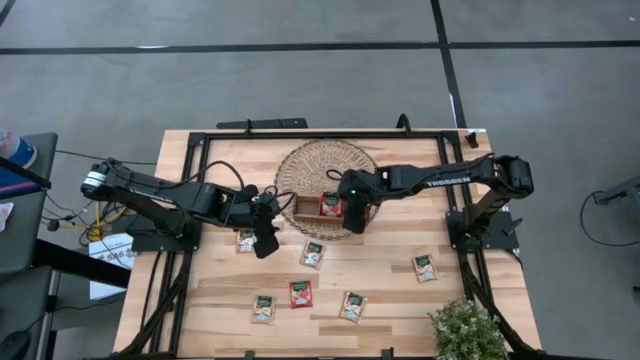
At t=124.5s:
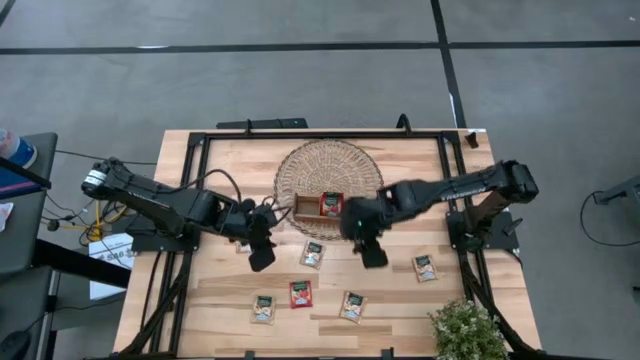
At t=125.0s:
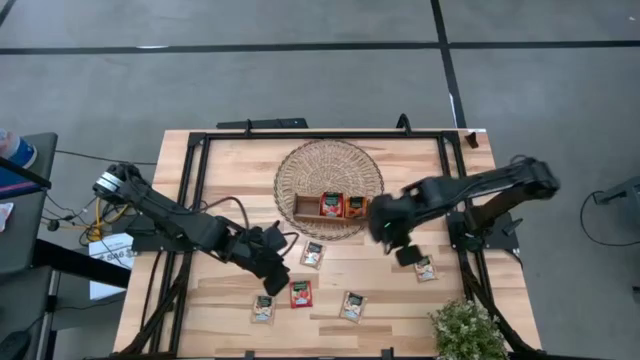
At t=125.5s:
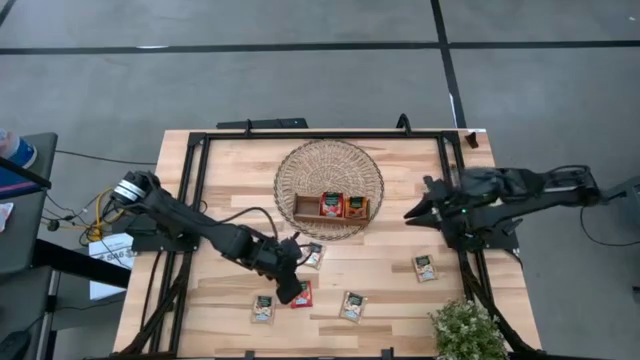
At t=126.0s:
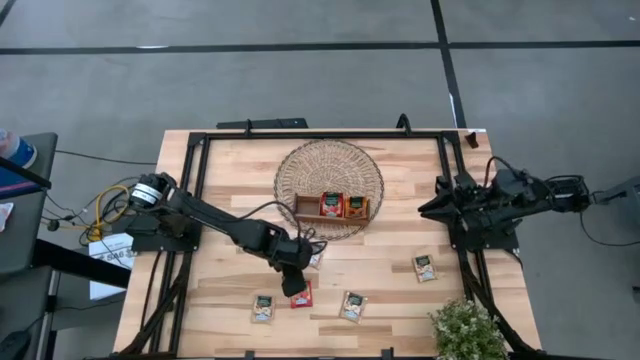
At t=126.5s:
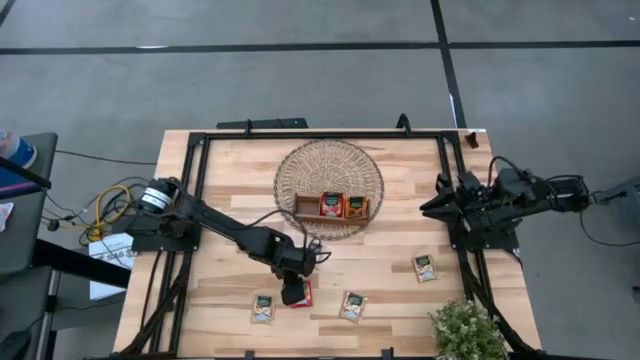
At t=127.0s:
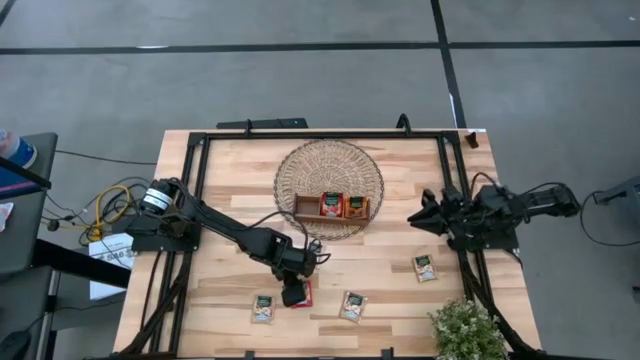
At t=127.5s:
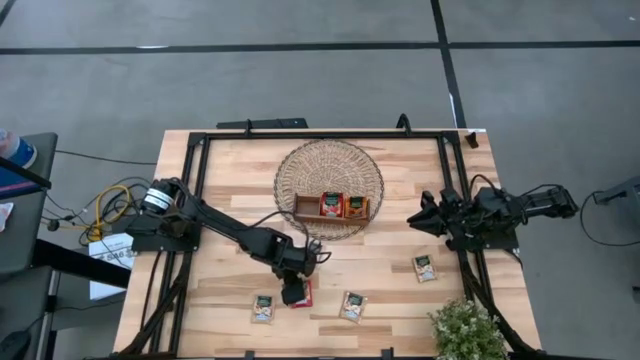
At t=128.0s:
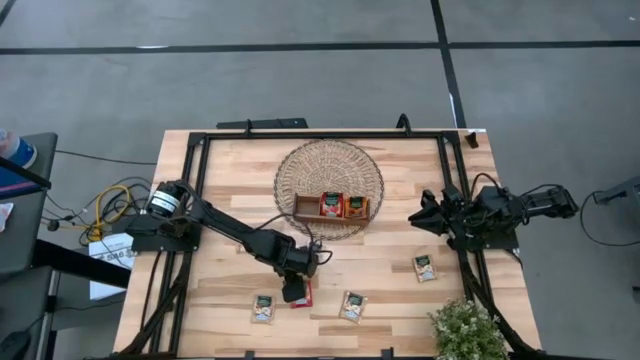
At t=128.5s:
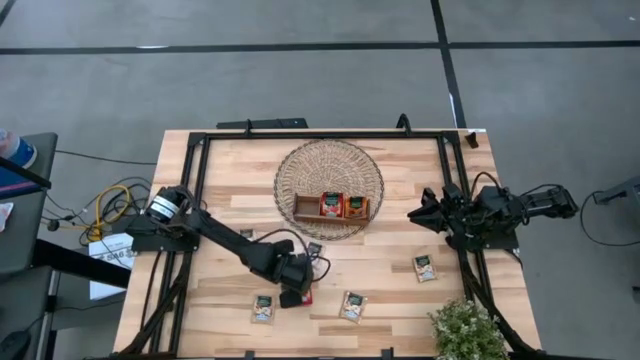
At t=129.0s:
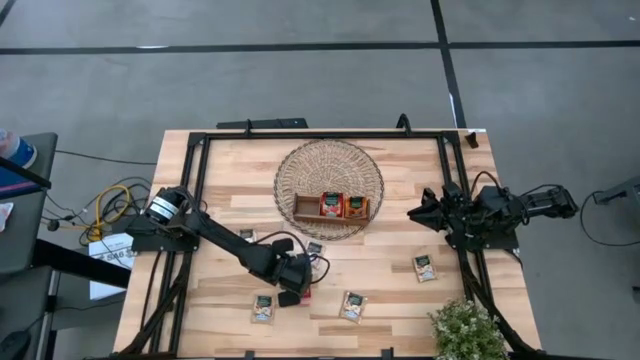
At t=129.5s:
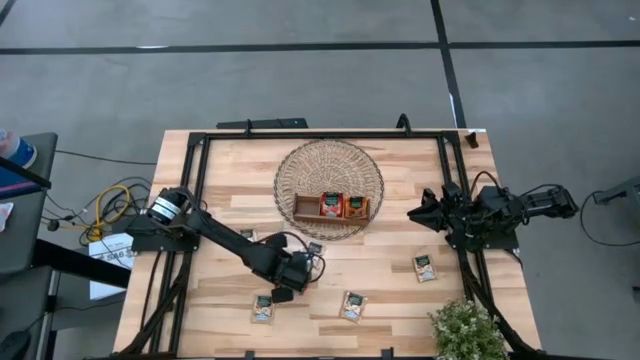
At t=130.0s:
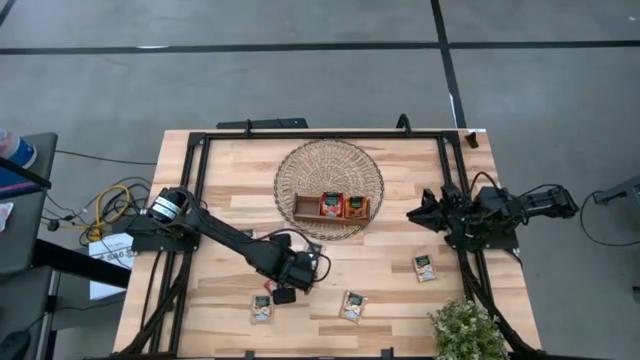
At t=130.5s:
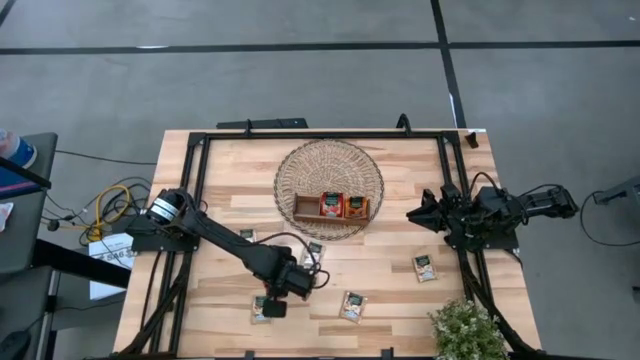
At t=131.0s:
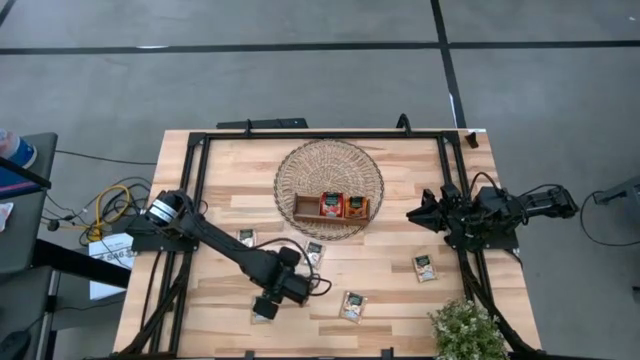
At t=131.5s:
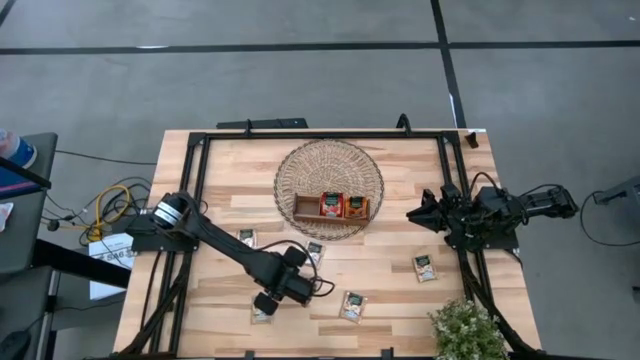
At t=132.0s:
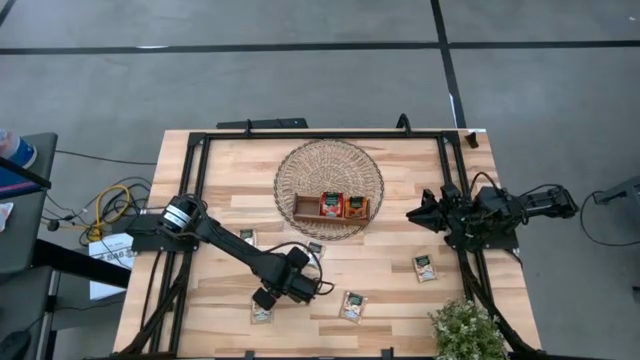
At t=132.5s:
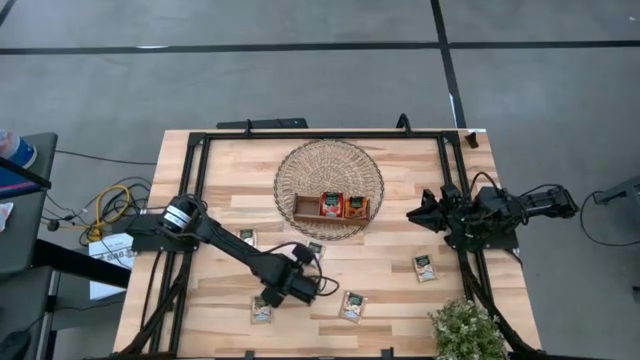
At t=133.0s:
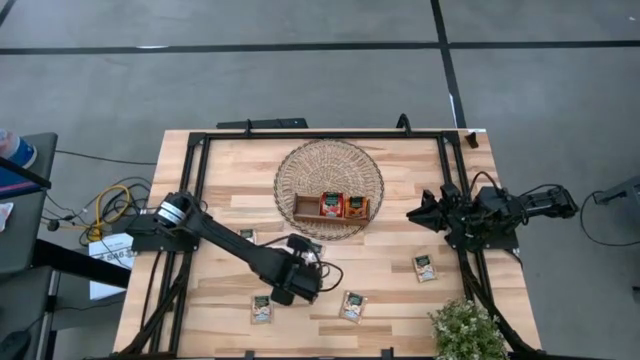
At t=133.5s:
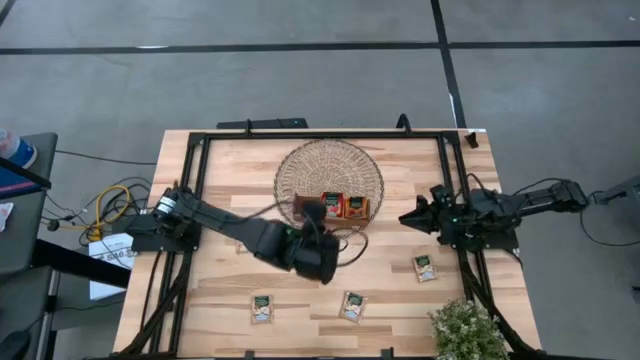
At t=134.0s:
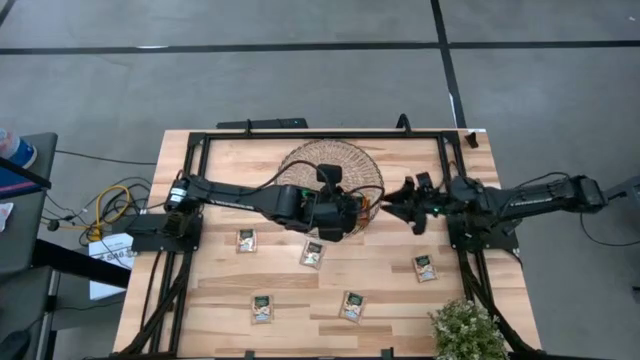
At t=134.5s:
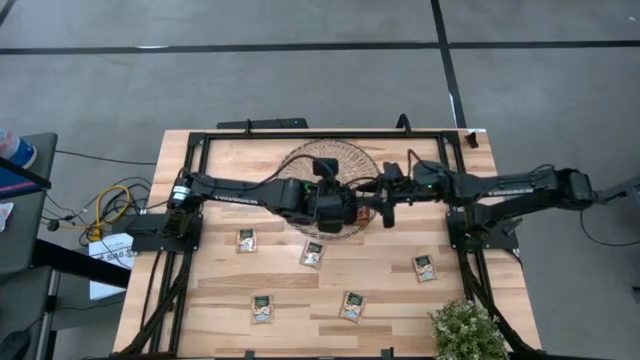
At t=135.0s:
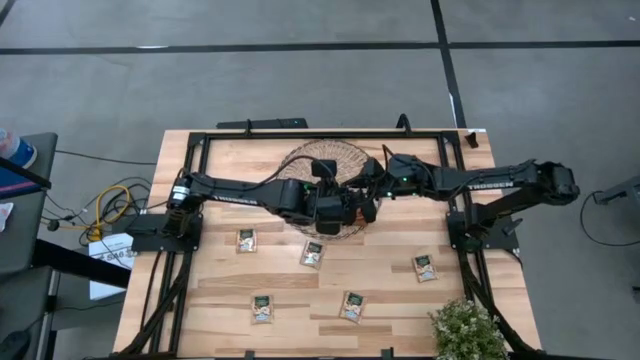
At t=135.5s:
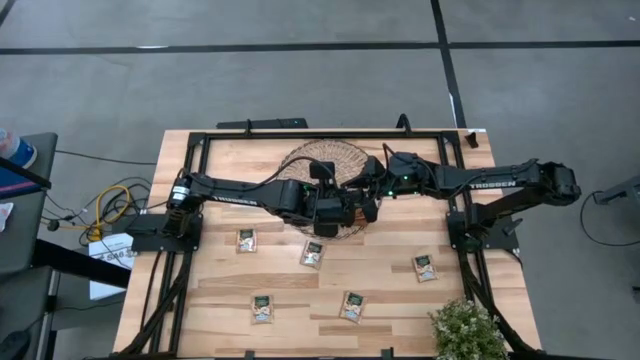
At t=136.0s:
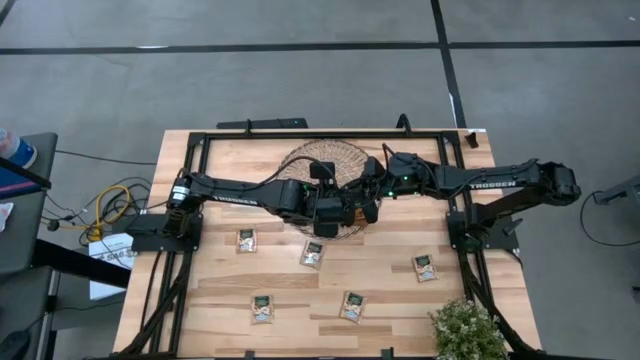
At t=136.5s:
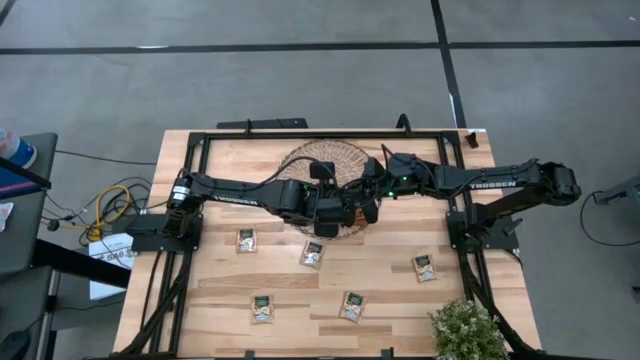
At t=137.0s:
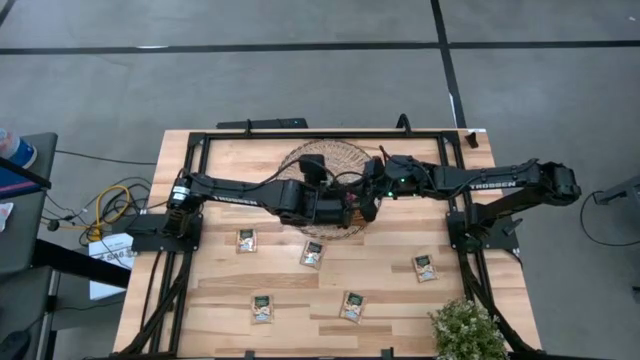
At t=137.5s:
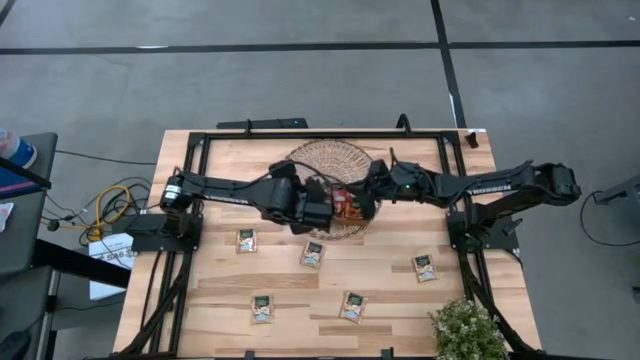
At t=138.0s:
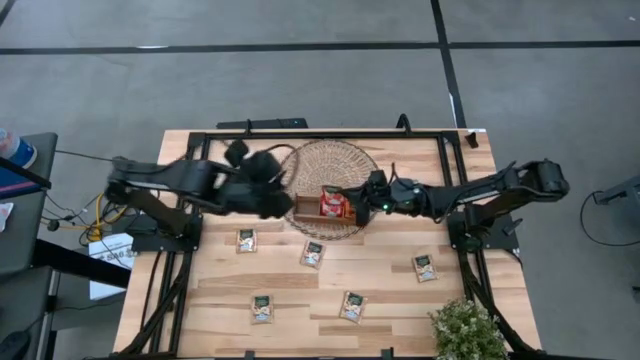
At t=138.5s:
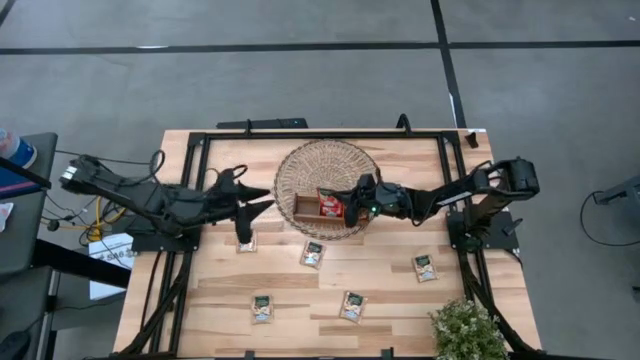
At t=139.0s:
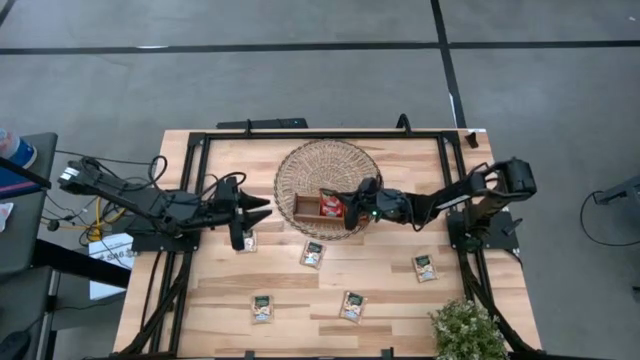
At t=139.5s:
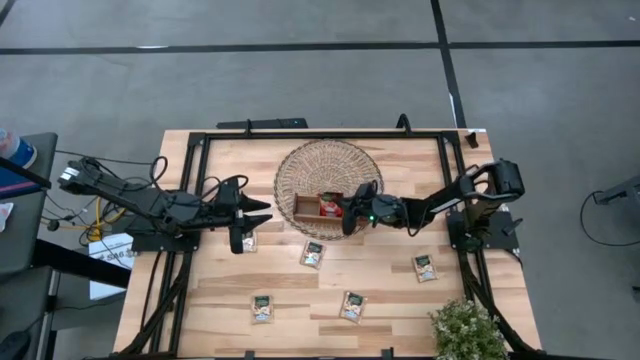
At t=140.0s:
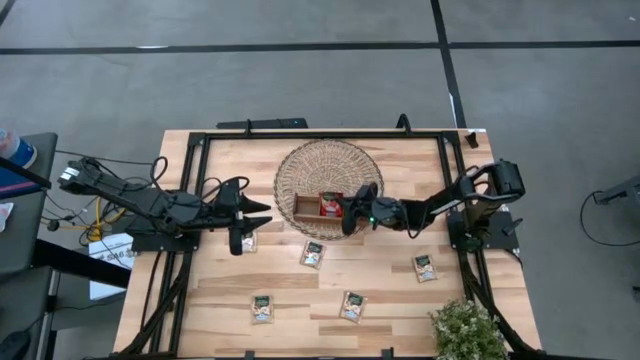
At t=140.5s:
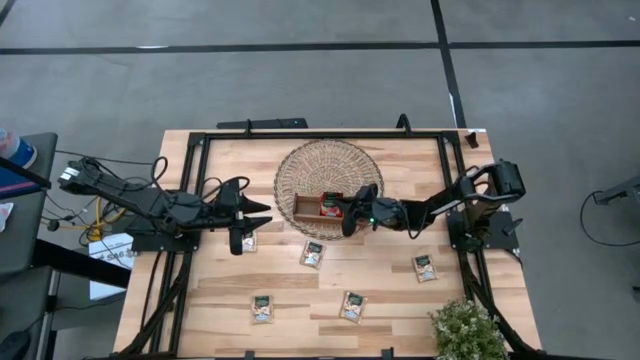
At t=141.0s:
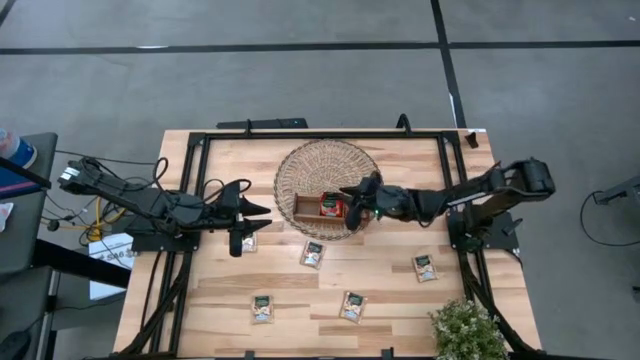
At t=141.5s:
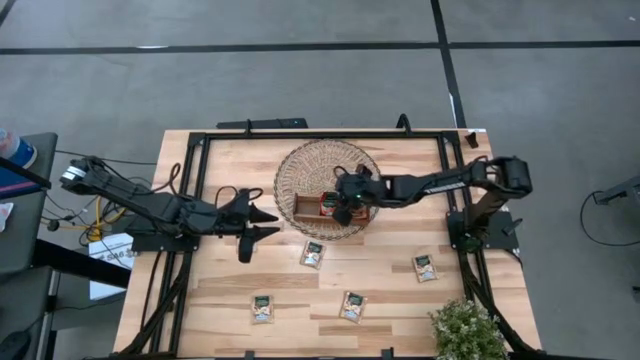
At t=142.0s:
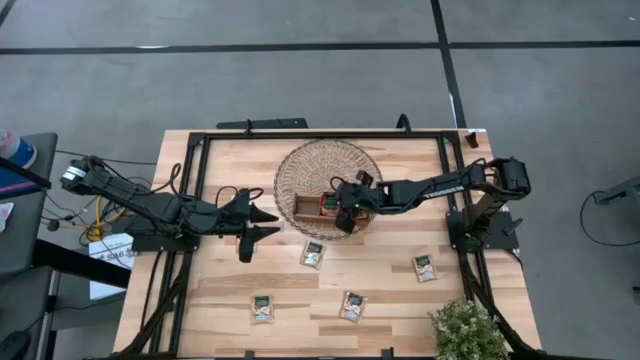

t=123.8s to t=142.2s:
Task: Pick & Place Tea
Put the red tea bag into the middle section of the wooden organizer

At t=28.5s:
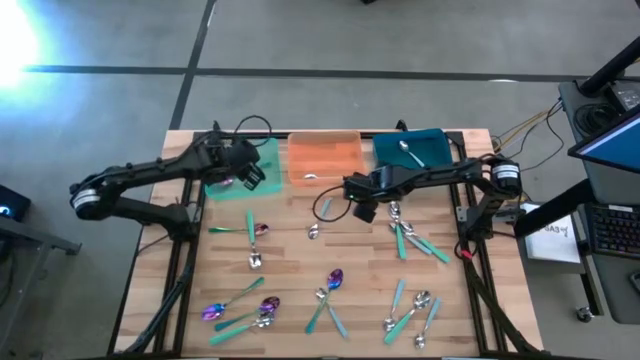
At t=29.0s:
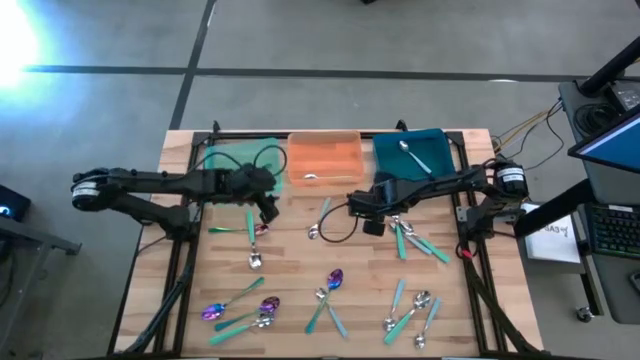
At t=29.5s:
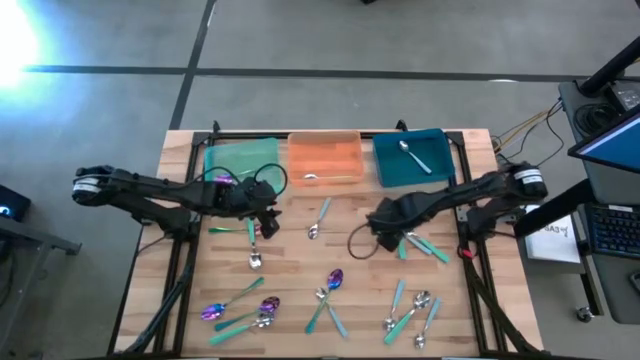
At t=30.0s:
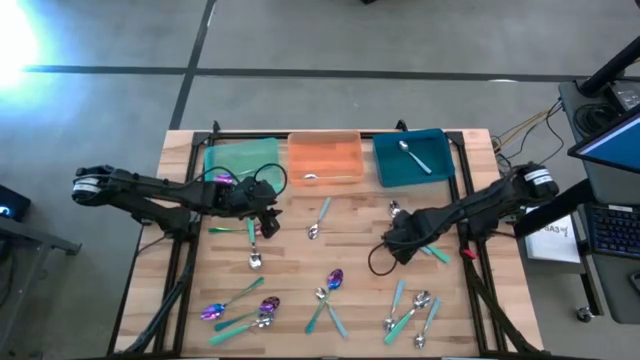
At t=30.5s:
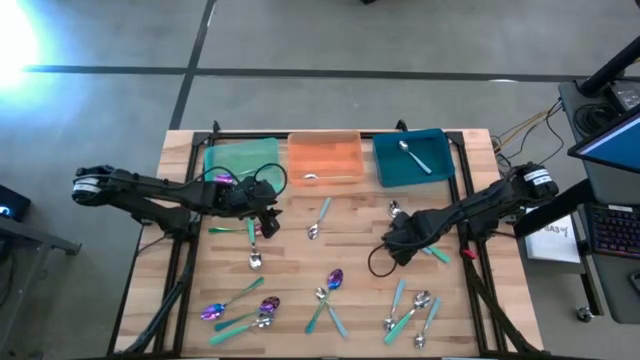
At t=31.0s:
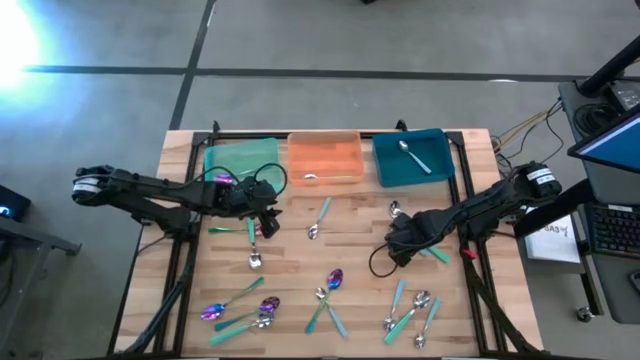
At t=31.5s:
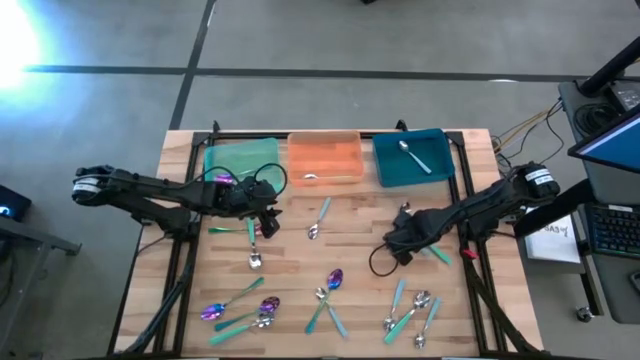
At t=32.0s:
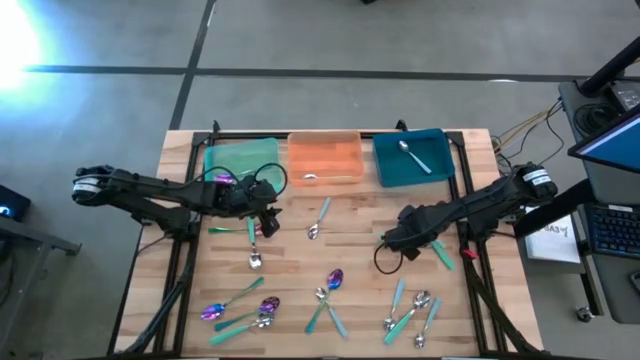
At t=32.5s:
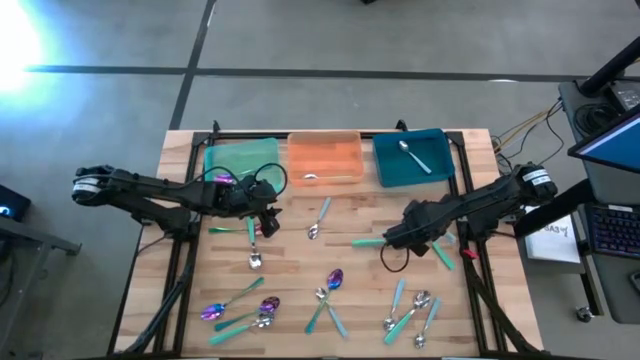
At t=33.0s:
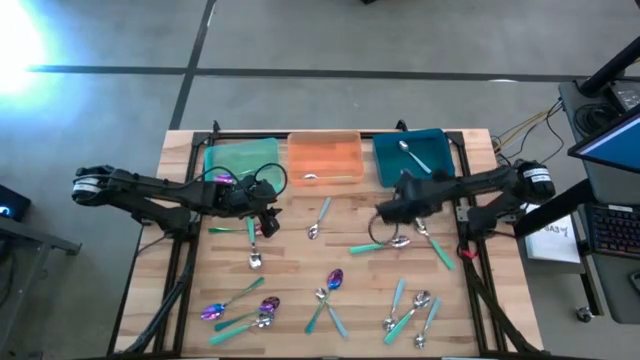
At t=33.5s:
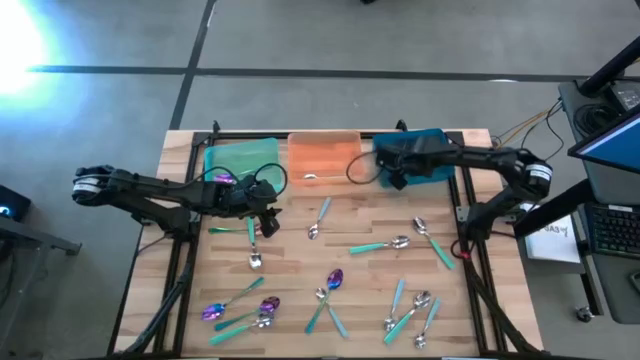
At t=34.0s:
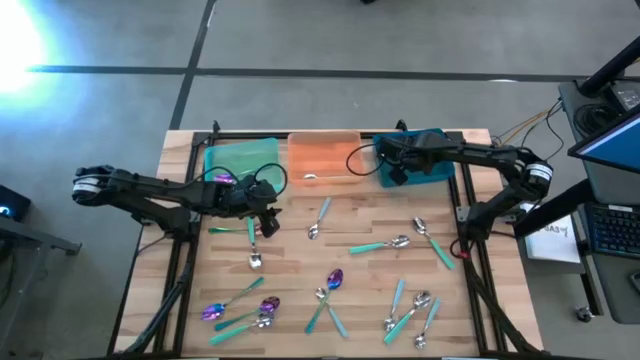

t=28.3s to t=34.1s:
Task: Sort silverware by color (type)
Put the light blue spoon into the blue bin
